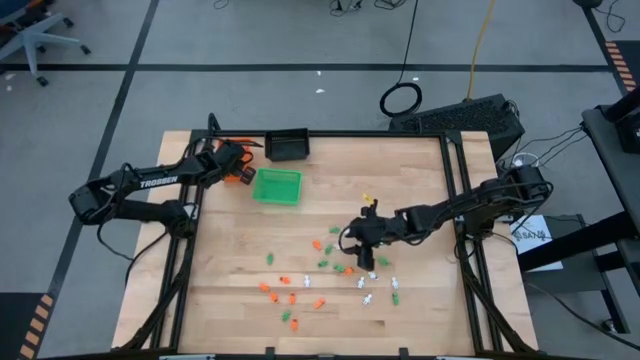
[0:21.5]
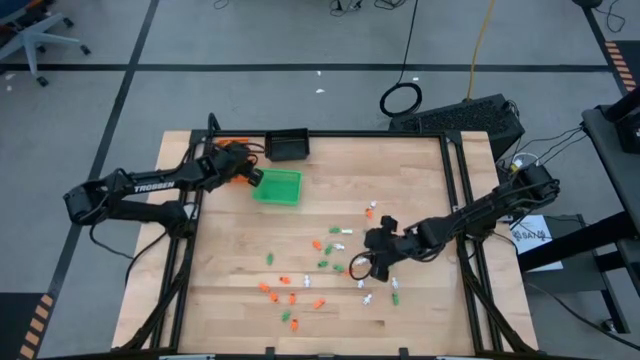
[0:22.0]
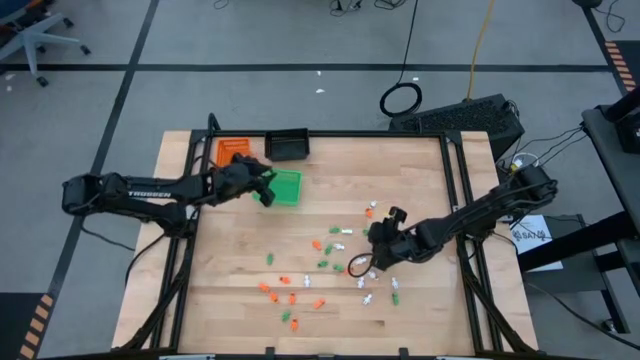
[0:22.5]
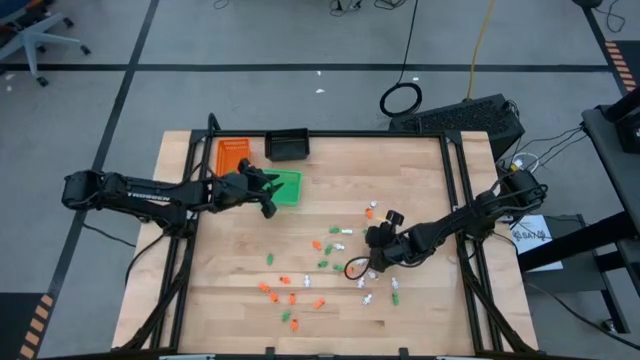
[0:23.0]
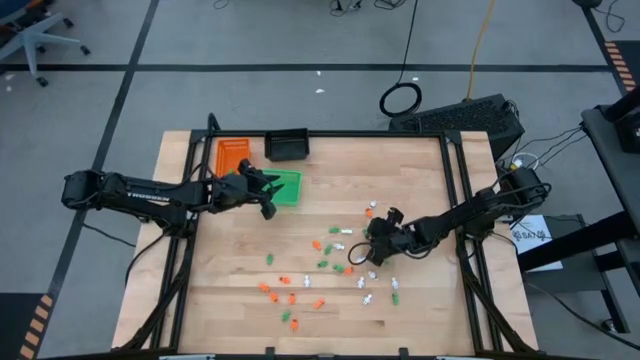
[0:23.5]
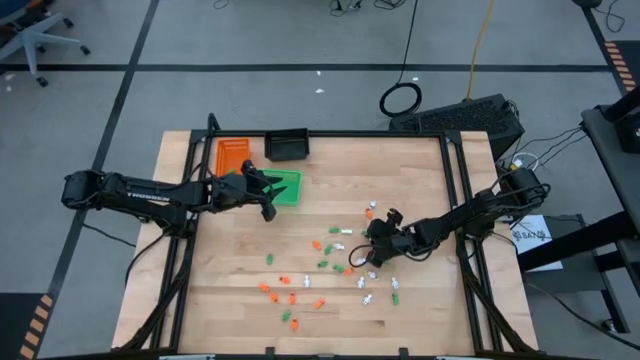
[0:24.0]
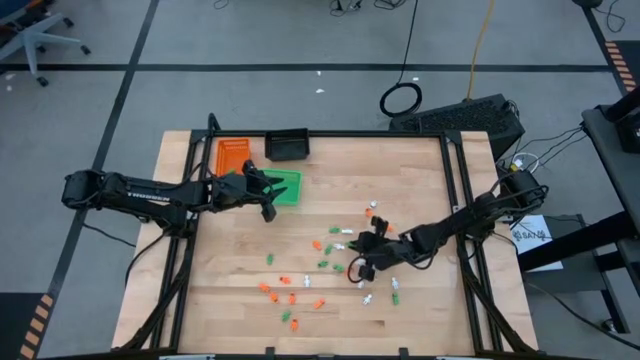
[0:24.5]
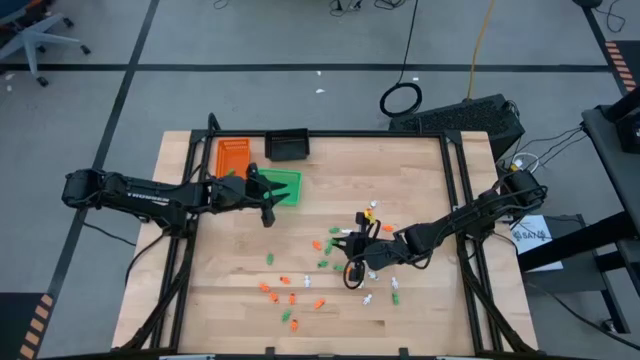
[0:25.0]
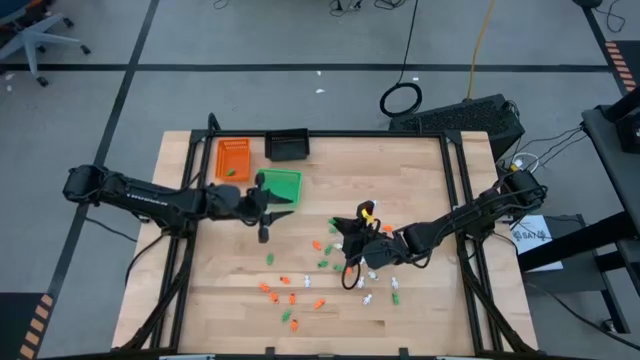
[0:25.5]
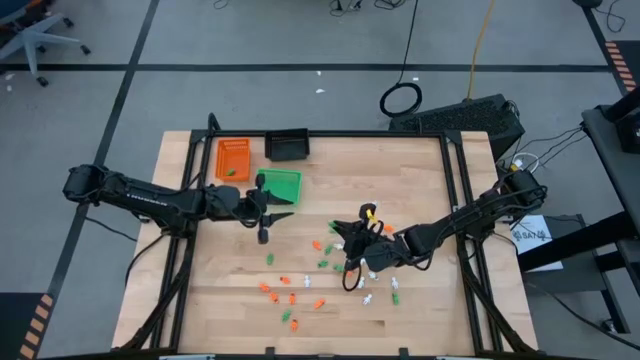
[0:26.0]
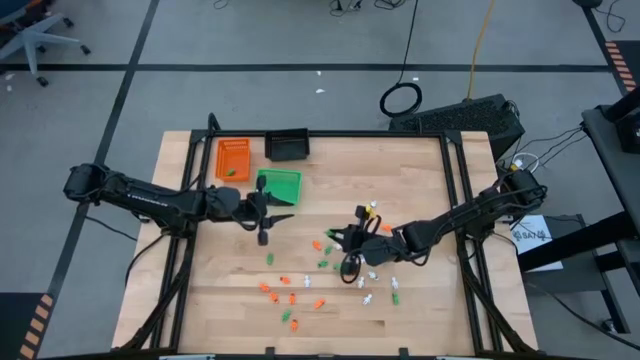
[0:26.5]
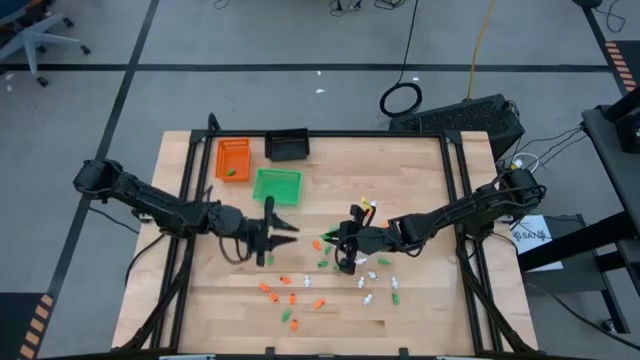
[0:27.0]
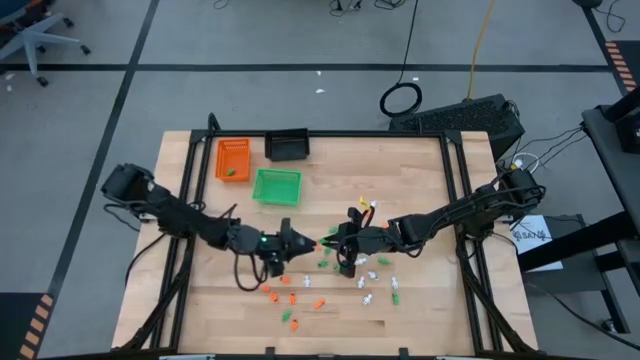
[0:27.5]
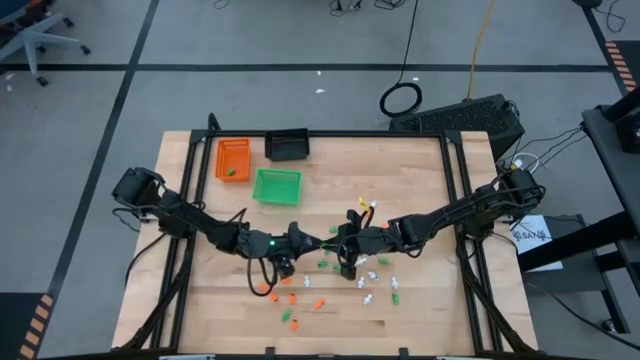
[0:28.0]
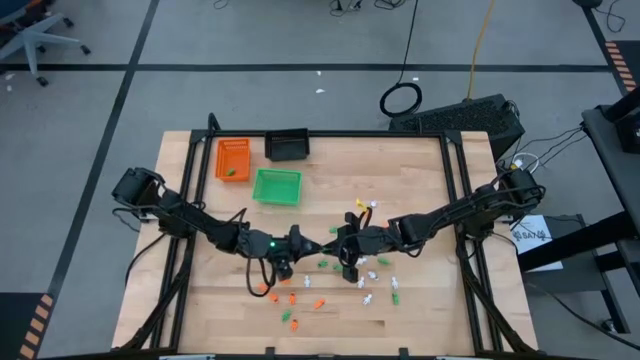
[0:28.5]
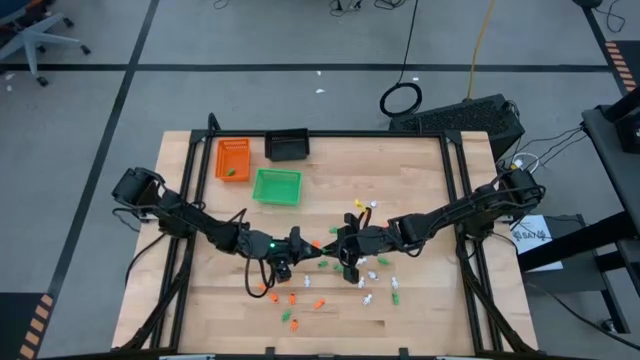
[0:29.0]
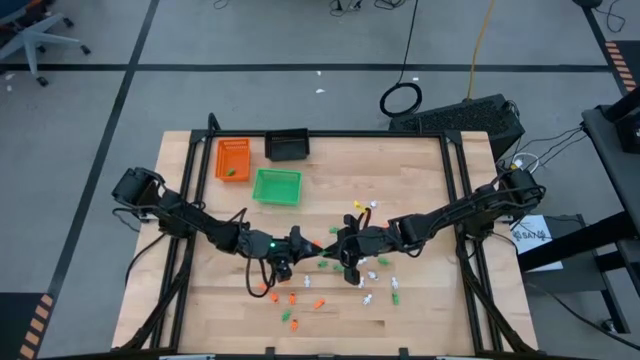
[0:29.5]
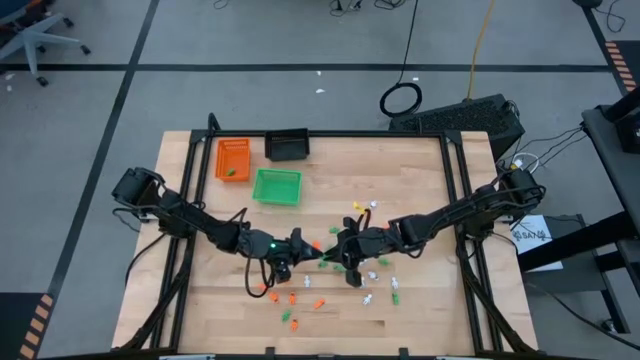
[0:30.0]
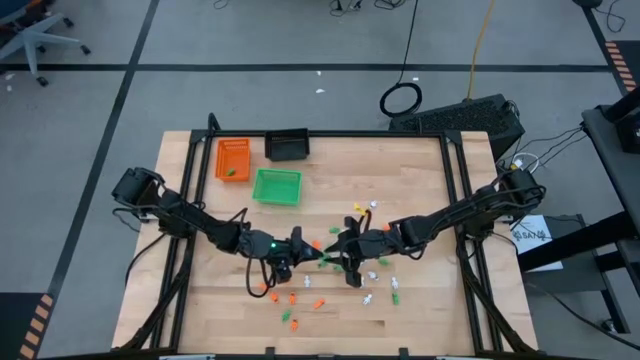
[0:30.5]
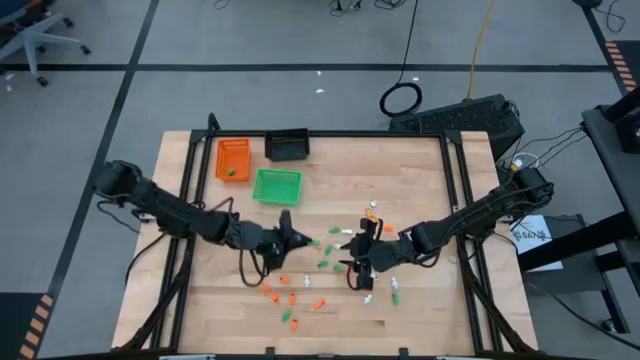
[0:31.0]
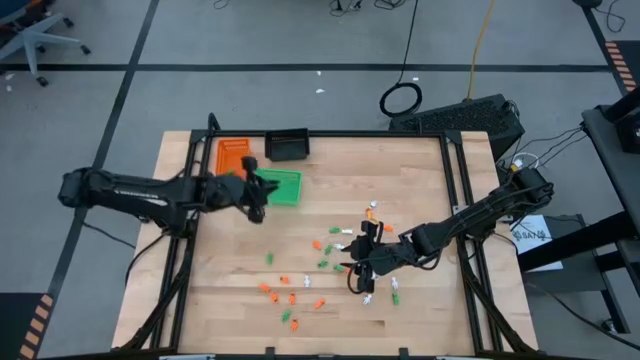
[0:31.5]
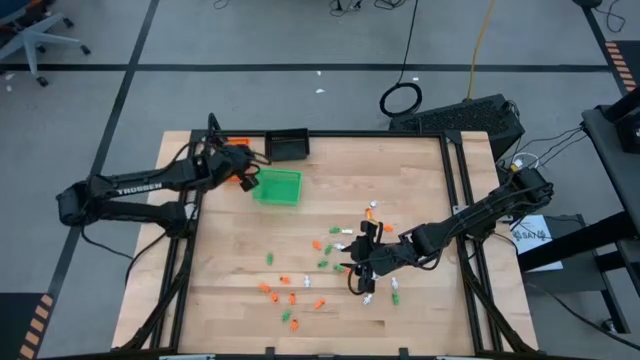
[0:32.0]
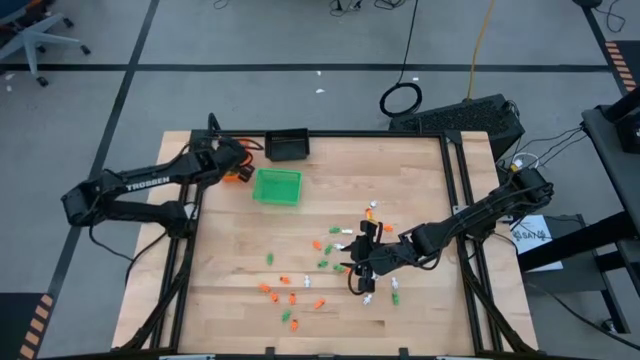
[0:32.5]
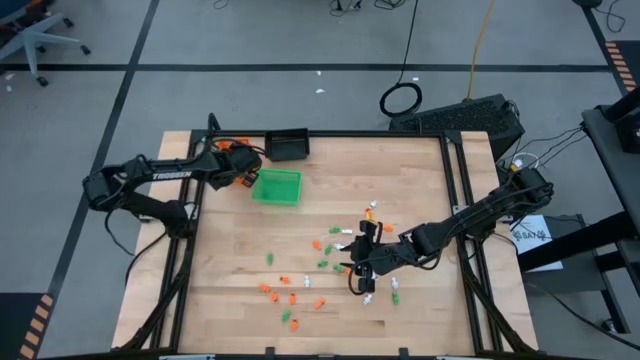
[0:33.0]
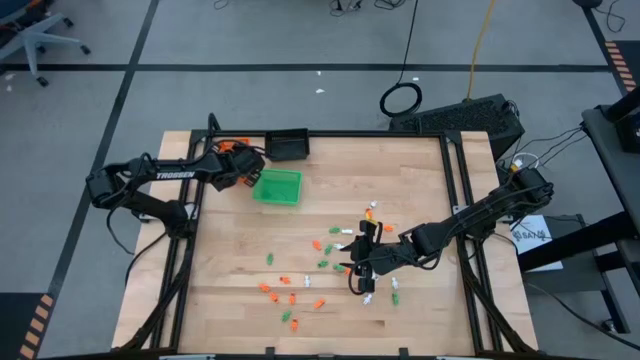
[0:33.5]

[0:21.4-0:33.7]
Task: Sort Halloween decoration
Put the green skeleton toy into the orange bin

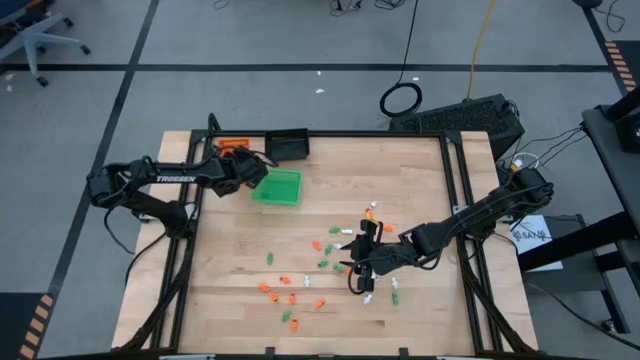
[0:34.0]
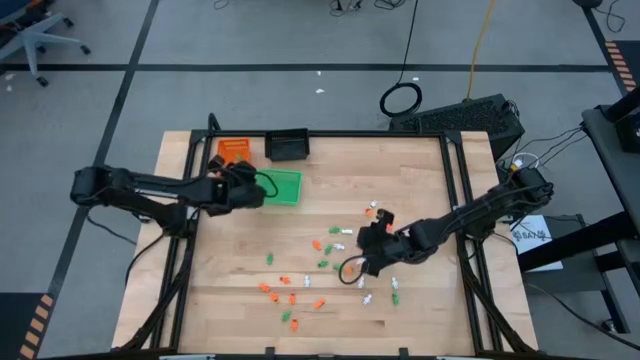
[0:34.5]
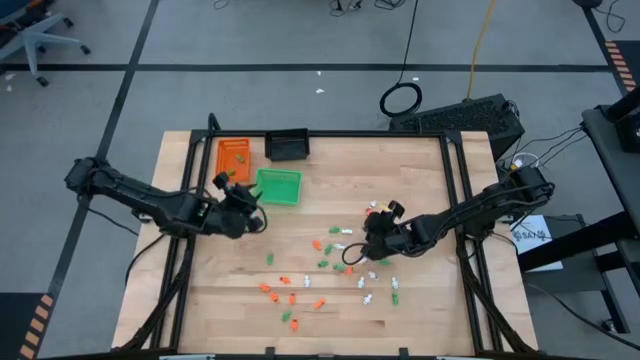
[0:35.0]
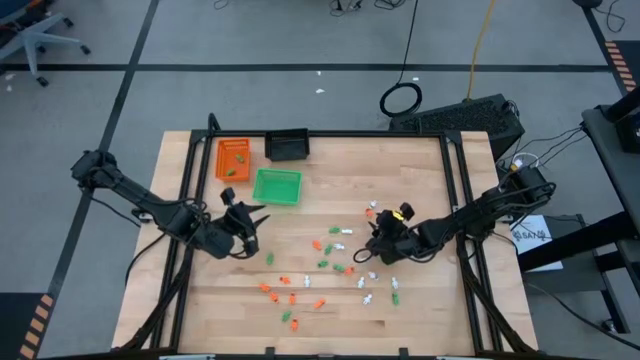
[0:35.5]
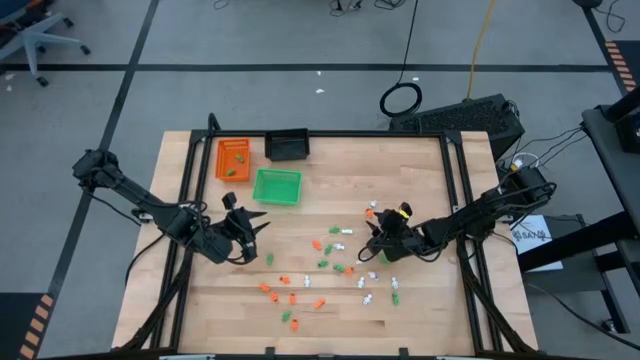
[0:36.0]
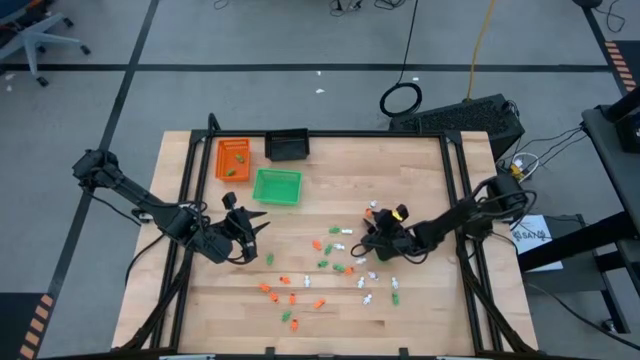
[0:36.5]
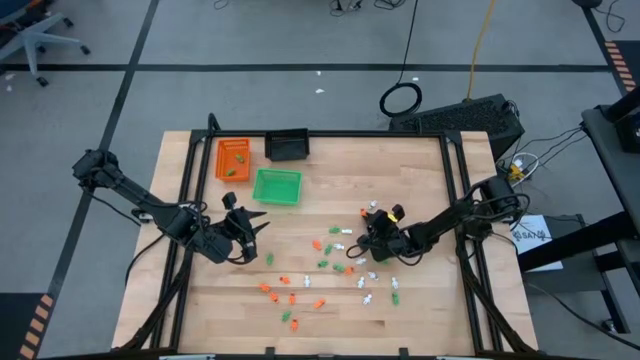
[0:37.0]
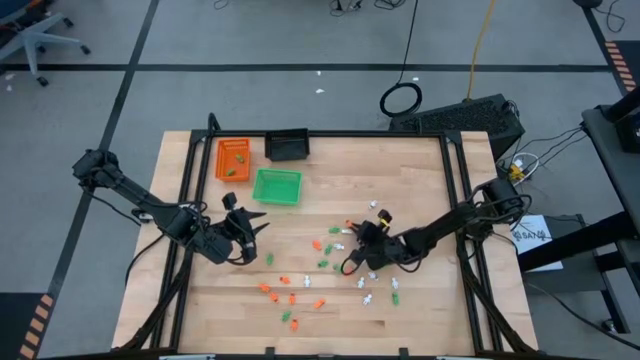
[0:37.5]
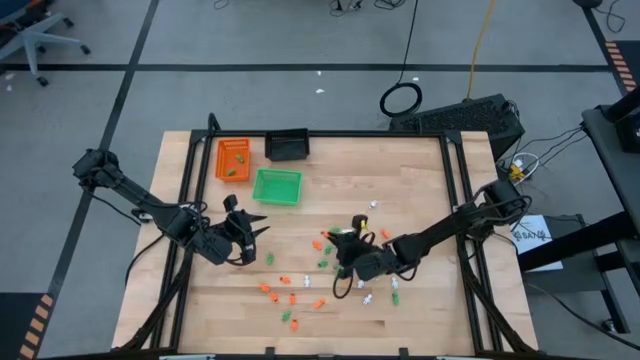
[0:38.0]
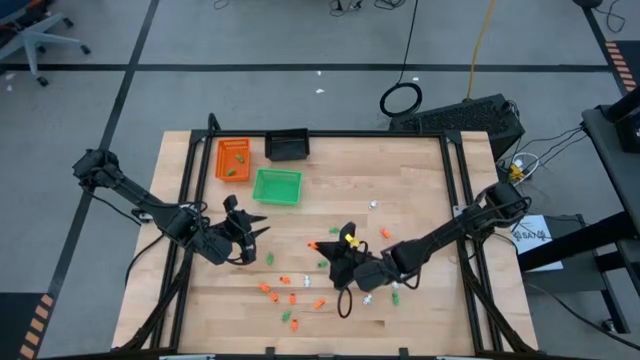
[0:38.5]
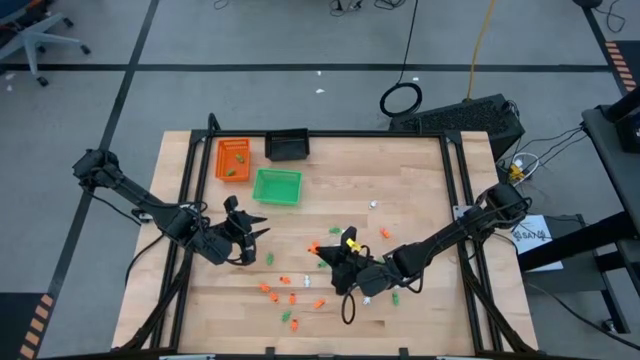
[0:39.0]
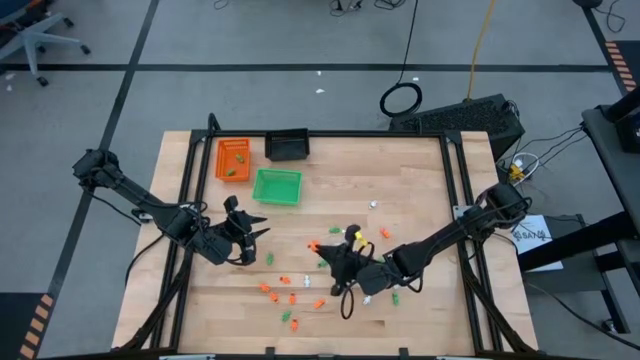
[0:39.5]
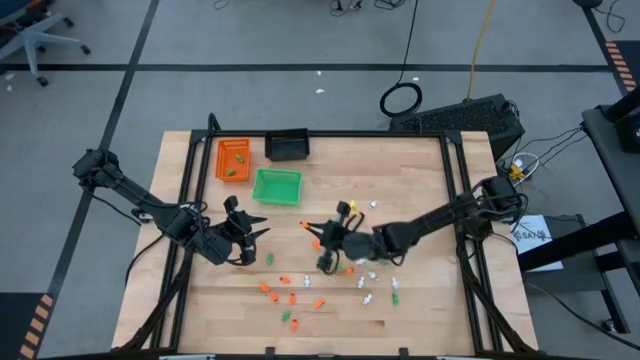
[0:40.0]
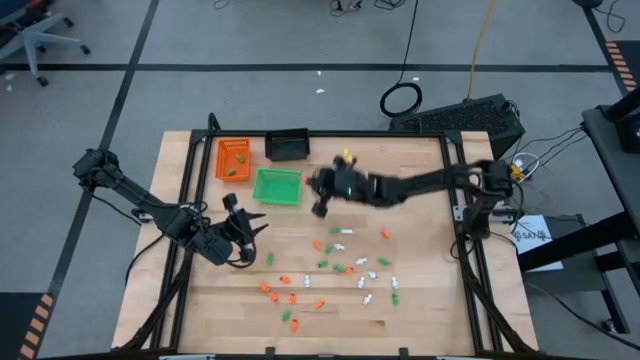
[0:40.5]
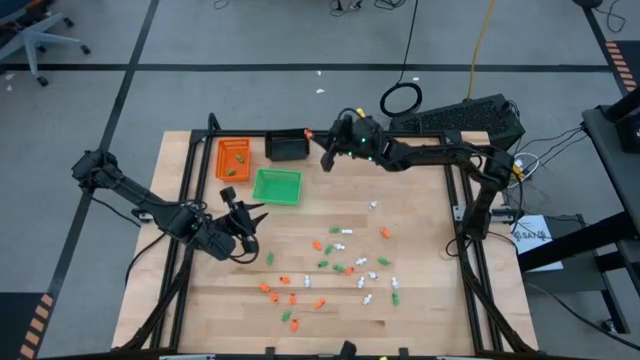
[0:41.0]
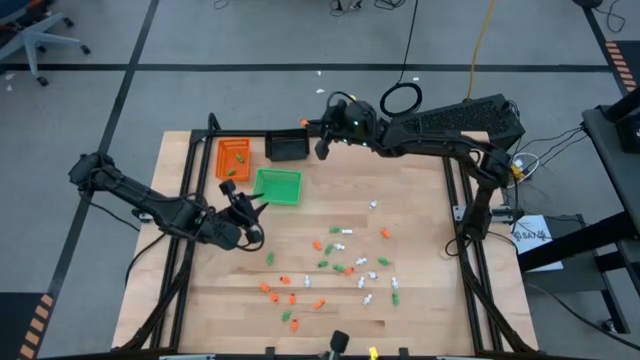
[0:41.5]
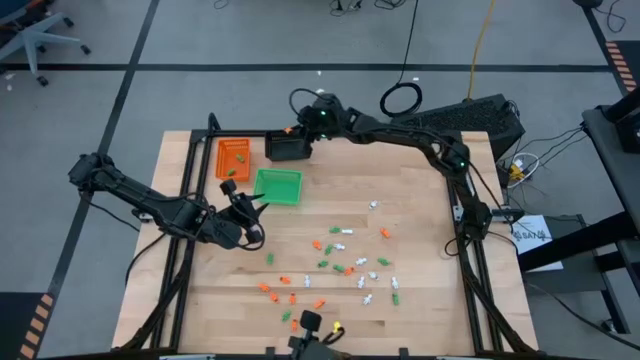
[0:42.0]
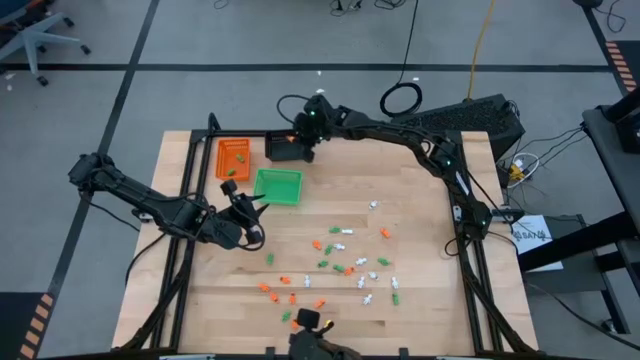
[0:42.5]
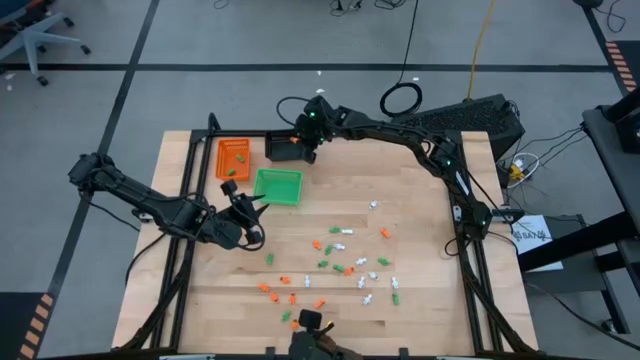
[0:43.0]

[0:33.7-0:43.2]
Put the orange skeleton toy into the black bin
